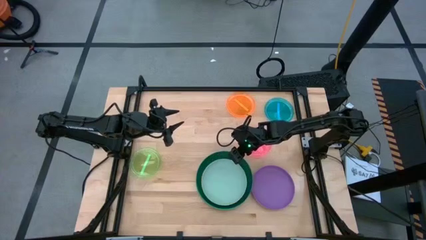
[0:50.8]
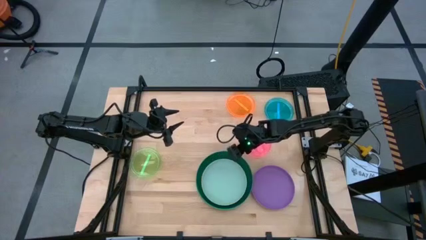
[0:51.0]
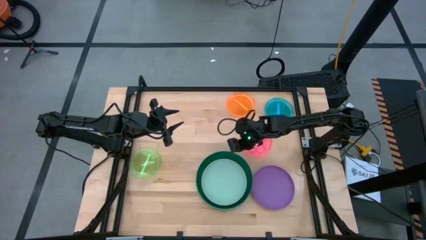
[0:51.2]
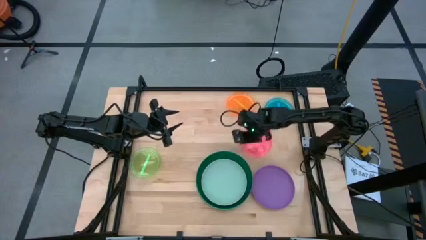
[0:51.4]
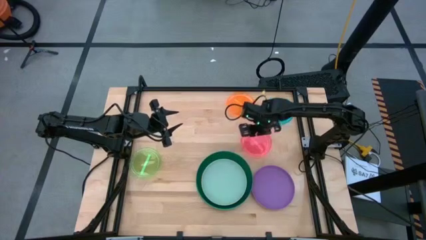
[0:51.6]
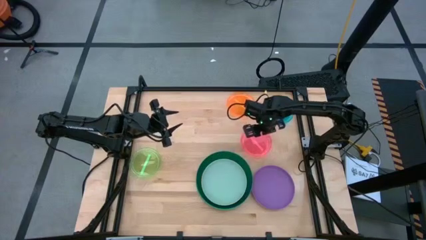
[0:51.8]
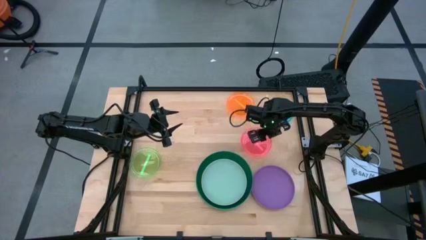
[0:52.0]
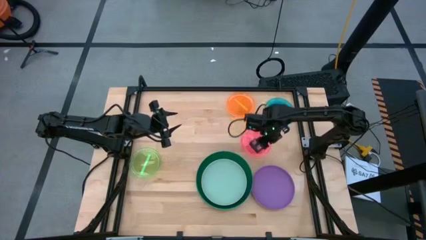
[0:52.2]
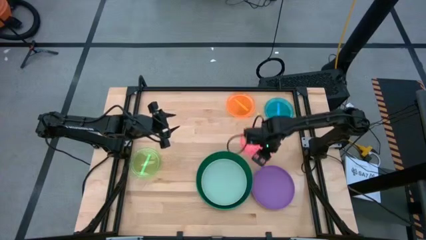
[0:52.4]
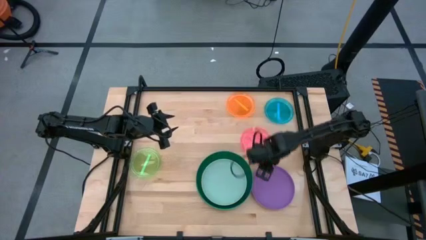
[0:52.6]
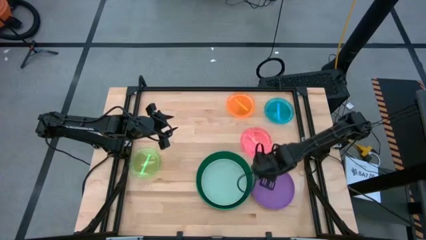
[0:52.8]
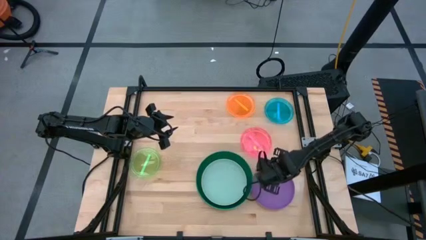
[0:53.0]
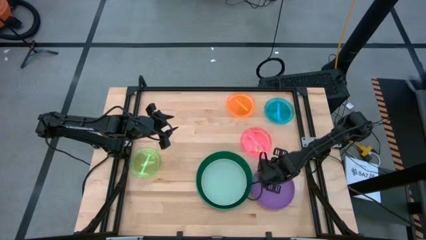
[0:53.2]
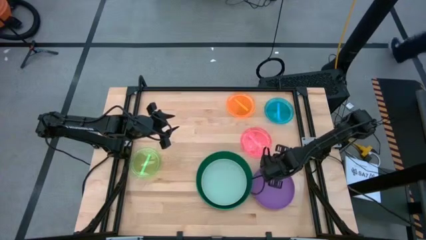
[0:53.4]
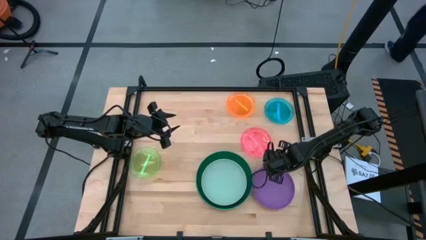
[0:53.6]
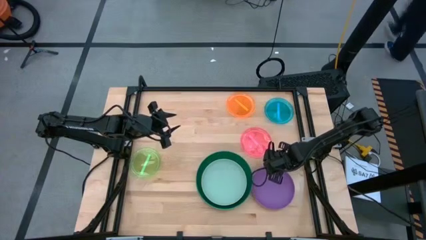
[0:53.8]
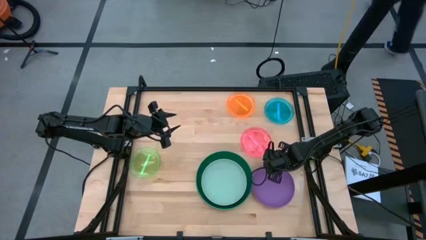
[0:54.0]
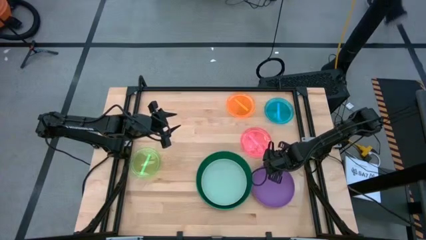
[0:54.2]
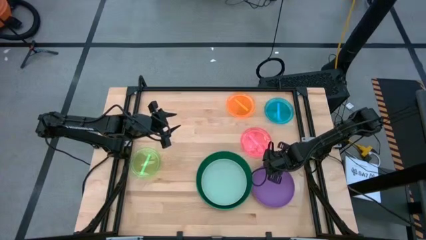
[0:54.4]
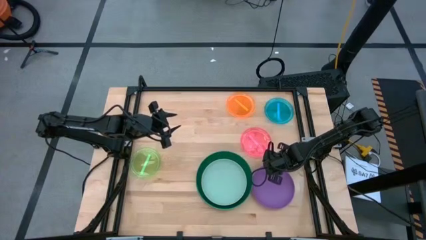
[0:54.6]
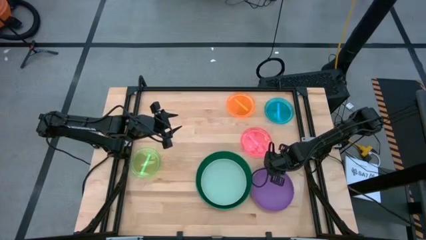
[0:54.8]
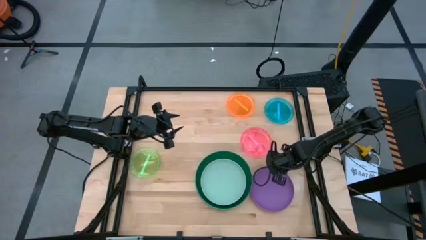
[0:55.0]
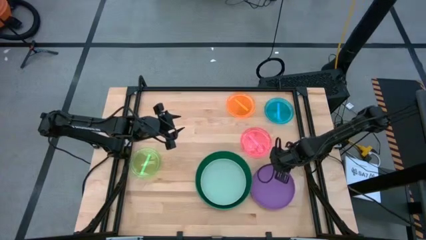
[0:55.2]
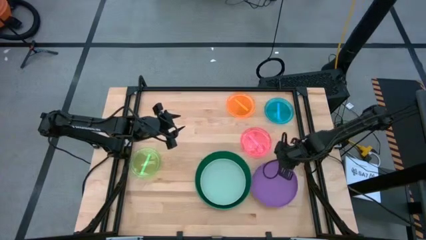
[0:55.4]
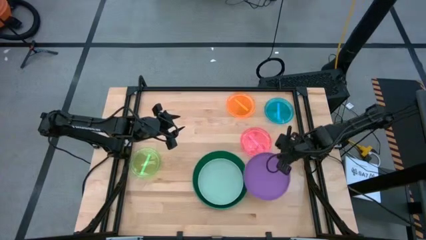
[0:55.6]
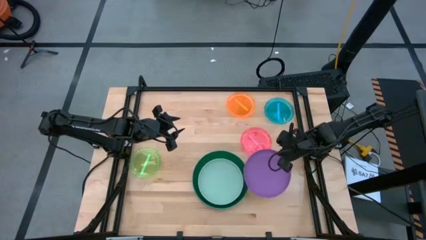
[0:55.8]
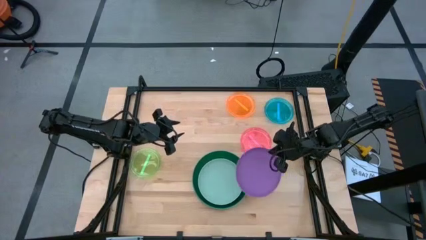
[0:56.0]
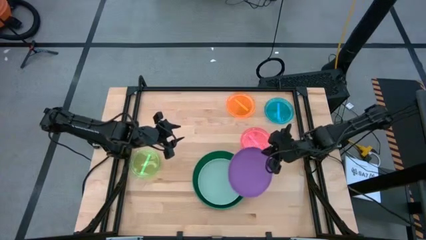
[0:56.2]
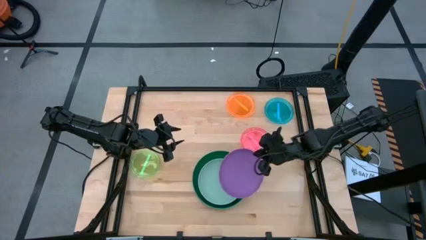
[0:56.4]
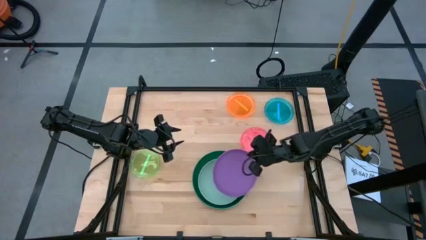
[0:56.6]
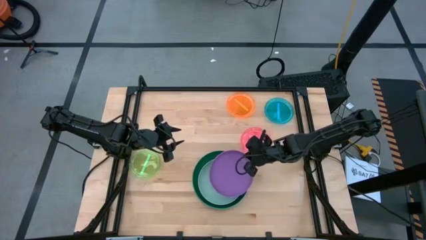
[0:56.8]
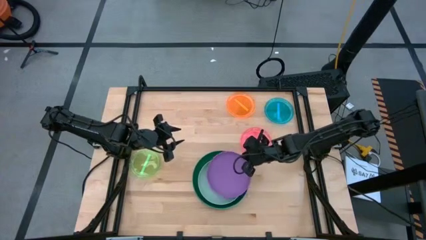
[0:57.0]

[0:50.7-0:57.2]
Task: Stack plastic plates
Stack the purple plate on top of the light blue plate

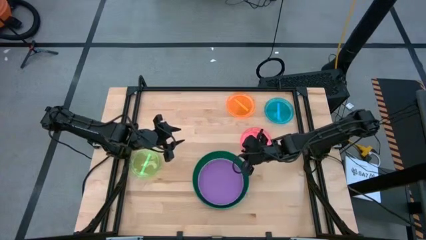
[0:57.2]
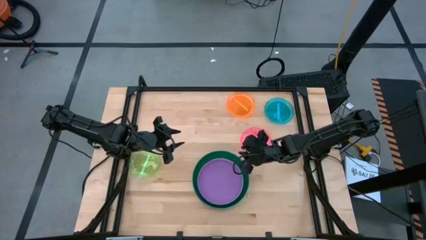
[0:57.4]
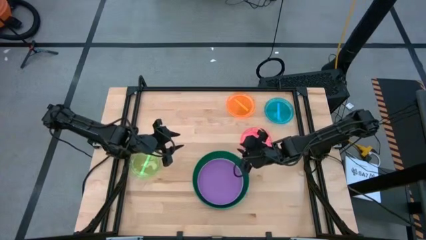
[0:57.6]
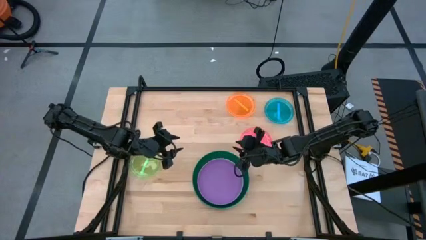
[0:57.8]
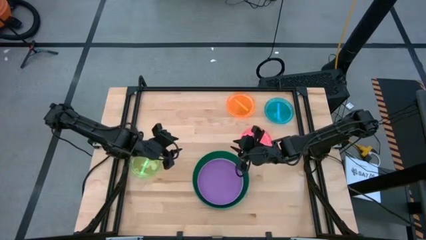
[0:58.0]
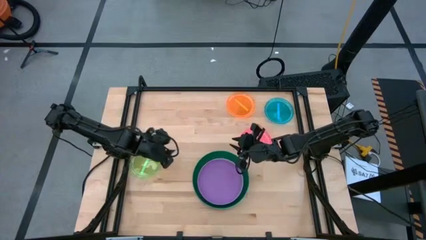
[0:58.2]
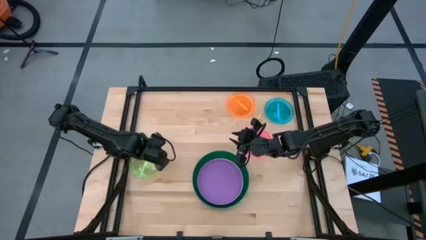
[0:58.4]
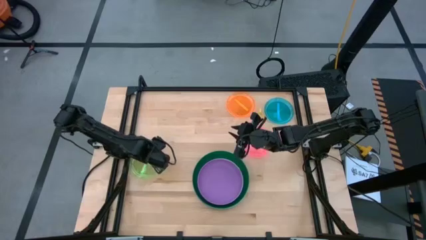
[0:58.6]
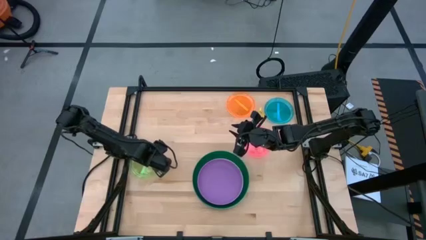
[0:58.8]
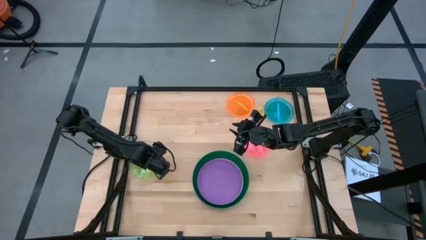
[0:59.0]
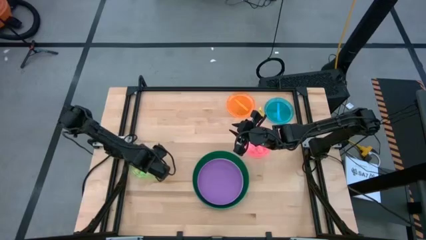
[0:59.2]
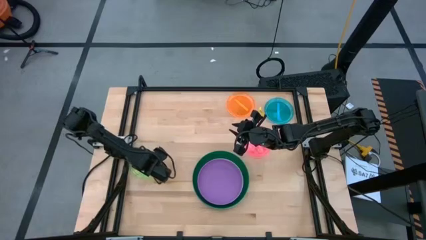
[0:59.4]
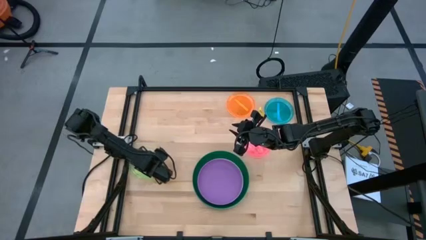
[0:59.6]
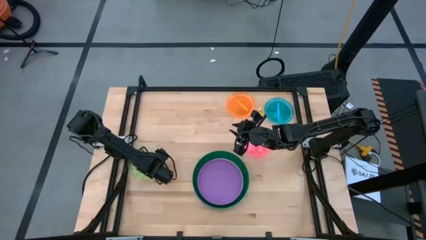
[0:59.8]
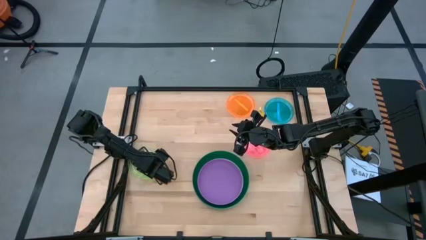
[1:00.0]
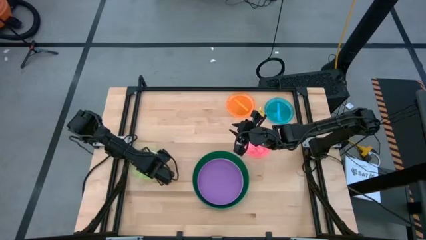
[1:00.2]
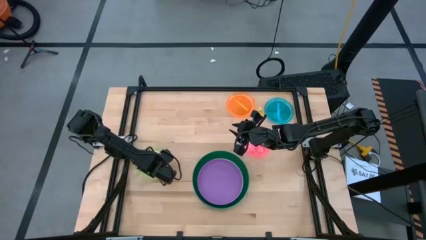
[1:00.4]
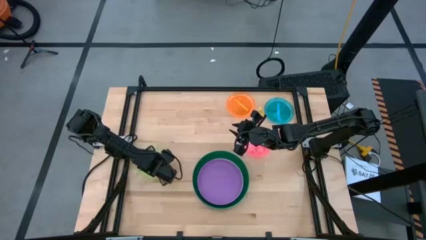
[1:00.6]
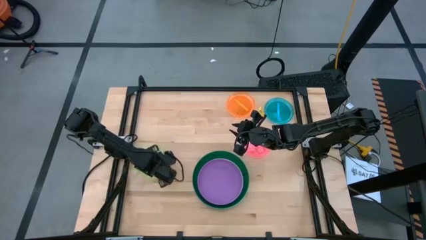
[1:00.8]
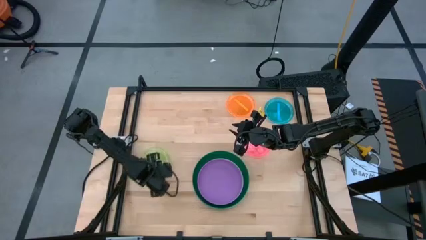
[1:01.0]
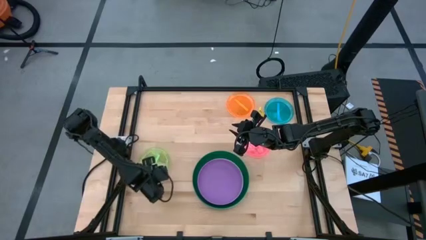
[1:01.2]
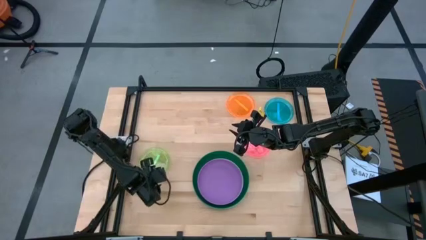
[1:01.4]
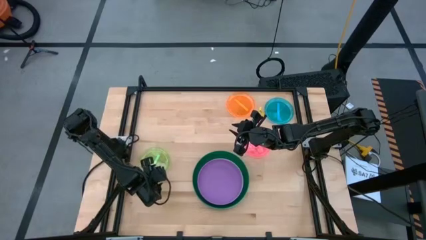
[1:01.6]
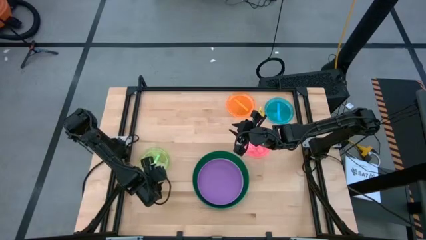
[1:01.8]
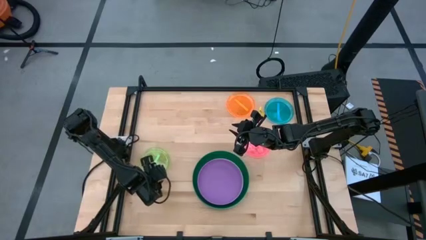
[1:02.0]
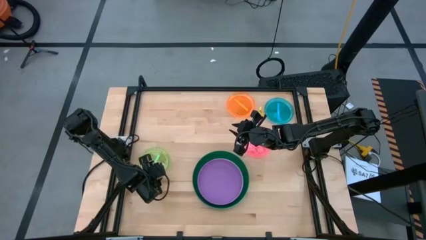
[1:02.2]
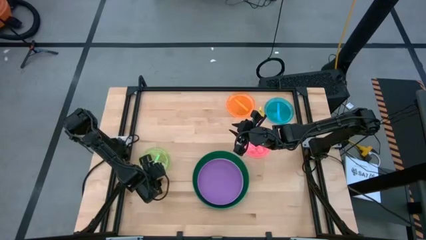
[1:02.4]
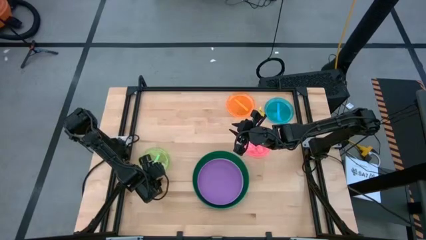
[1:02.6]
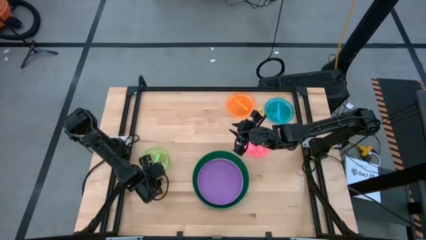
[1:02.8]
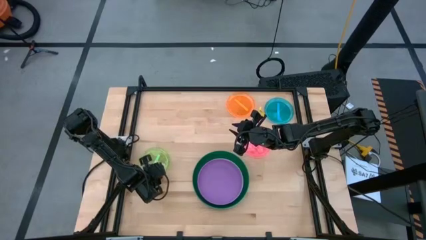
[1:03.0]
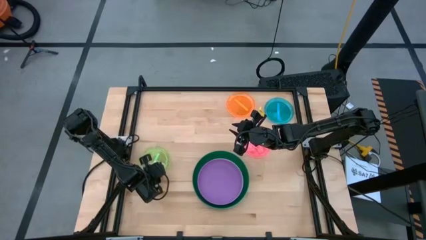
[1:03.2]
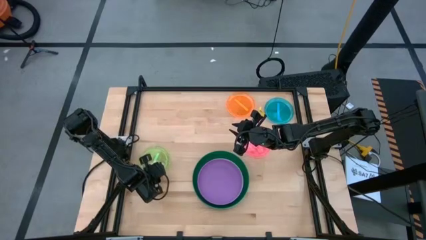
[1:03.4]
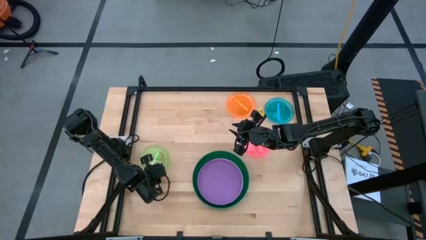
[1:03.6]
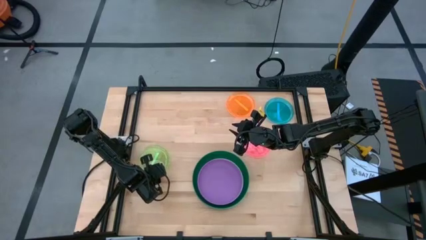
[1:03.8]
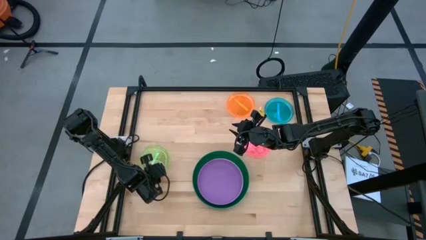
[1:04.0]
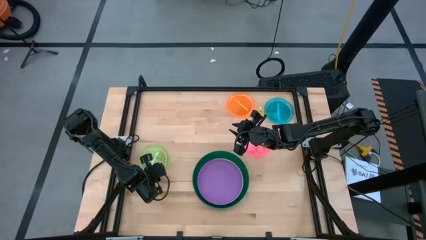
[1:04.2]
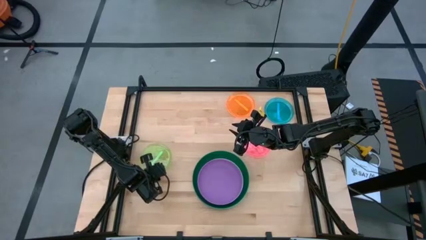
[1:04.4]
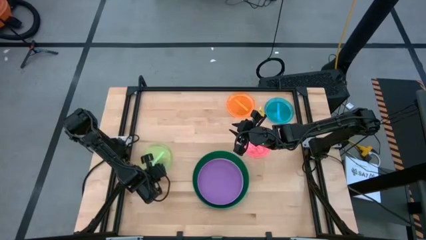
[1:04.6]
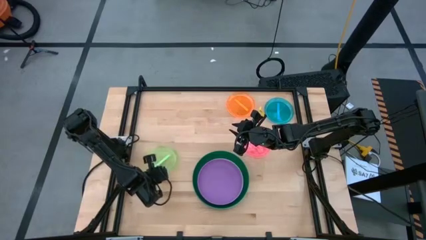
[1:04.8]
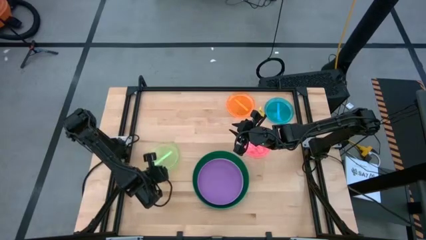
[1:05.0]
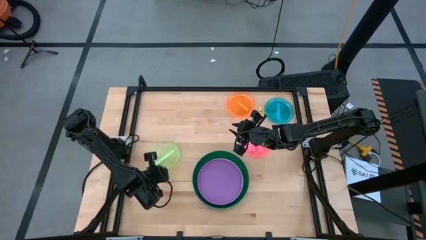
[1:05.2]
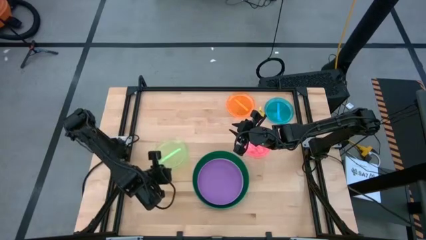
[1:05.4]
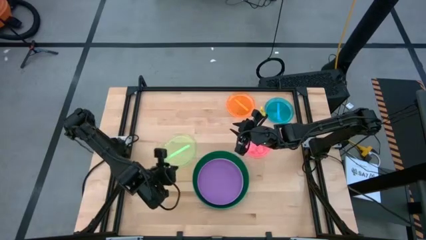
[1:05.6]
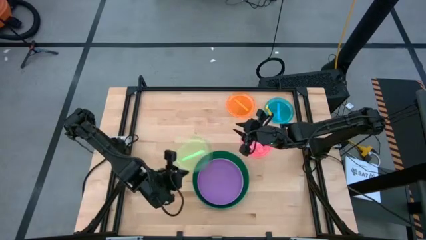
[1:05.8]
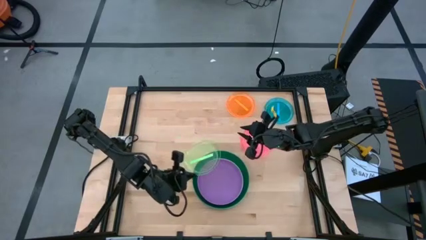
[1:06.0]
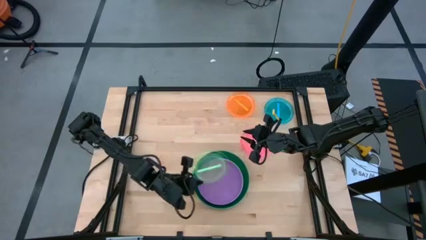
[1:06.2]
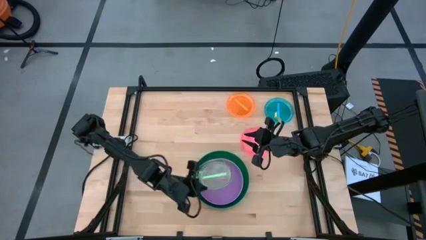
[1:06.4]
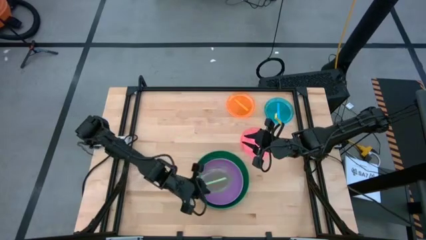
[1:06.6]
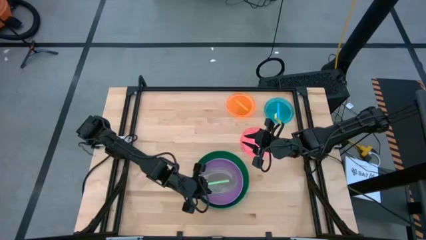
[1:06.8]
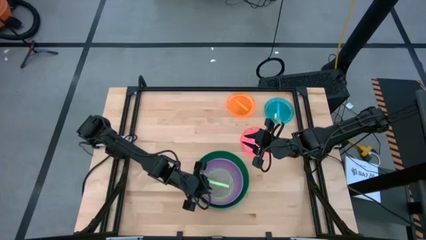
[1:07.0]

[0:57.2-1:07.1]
Stack the transparent green plate on top of the purple plate

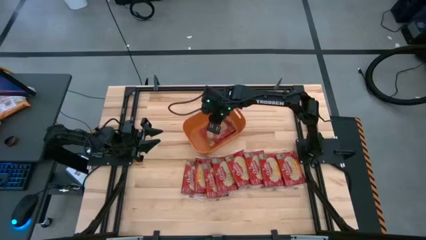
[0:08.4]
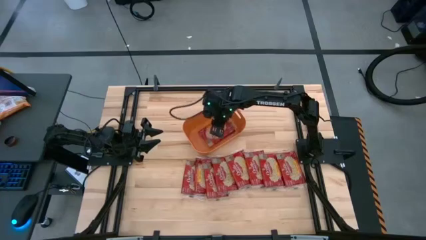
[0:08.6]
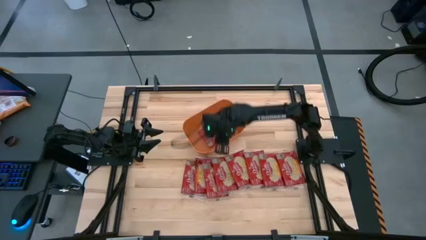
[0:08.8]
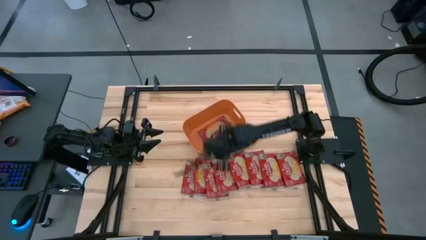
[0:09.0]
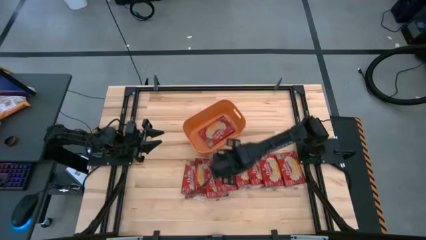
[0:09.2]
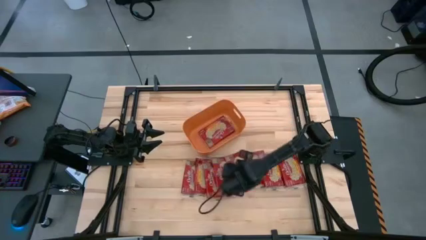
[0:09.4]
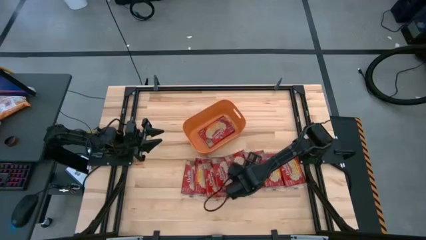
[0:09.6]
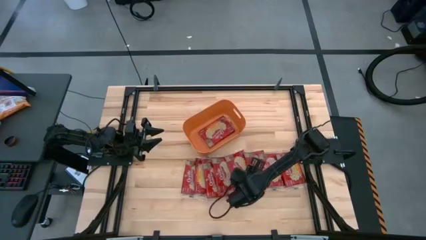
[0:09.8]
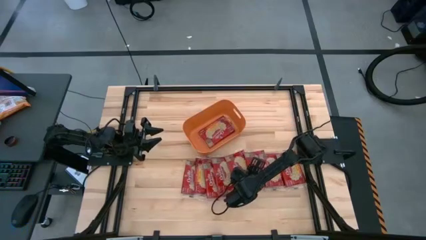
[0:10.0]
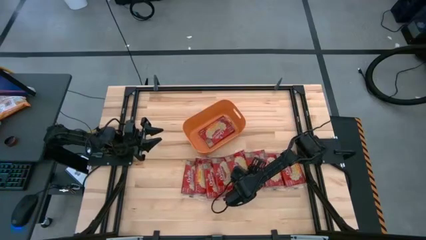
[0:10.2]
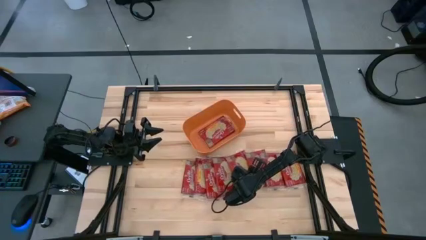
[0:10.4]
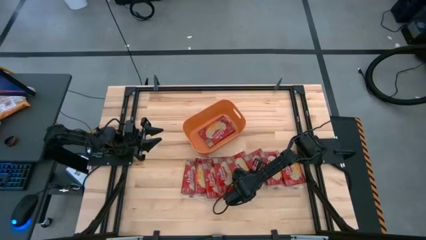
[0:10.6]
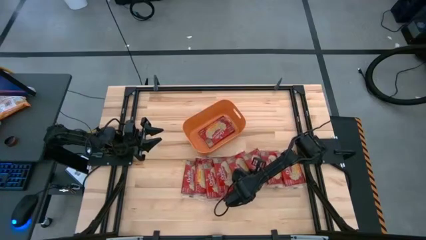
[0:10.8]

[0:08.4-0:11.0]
Task: Sort popcorn bags into baskets
Put the pop corn bag into the orange bin
